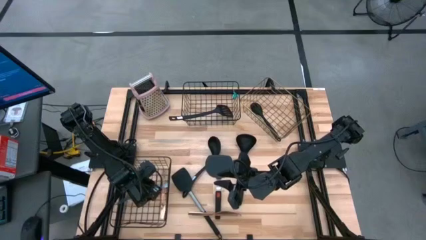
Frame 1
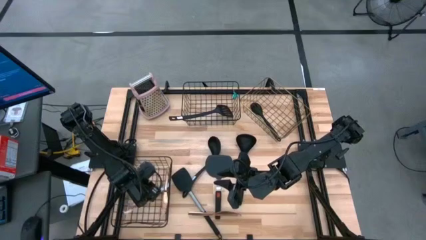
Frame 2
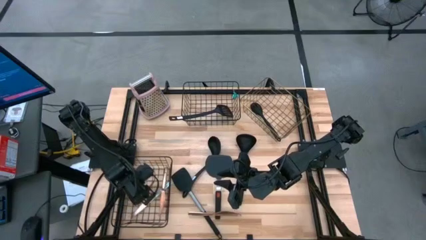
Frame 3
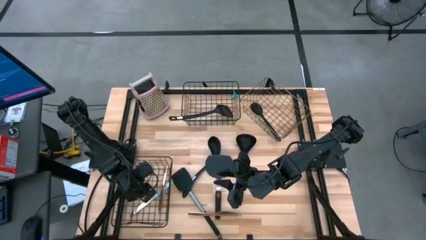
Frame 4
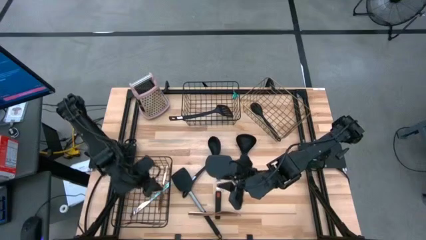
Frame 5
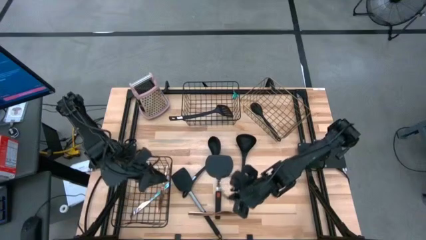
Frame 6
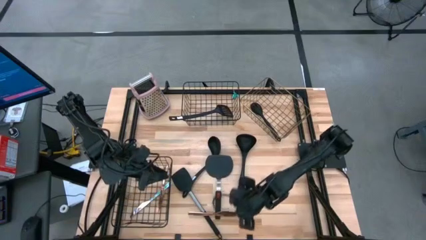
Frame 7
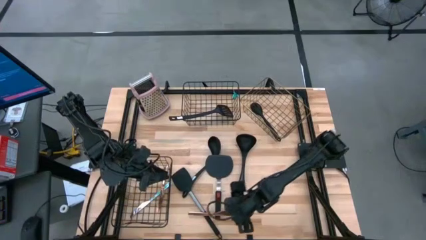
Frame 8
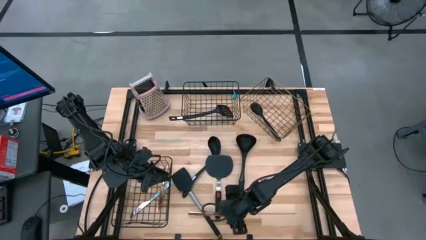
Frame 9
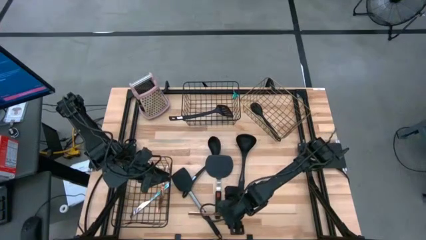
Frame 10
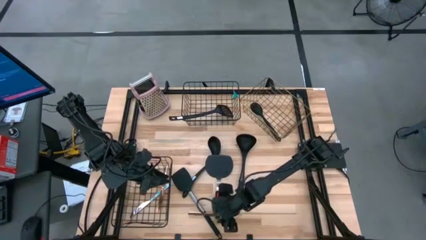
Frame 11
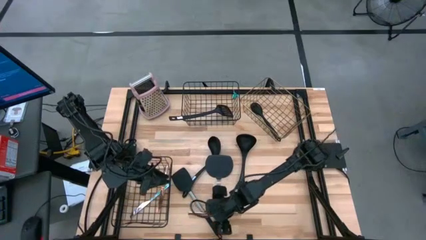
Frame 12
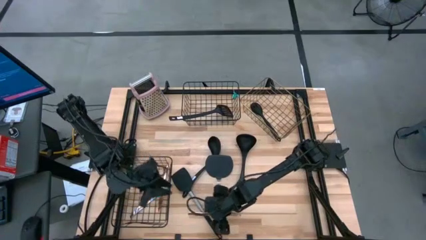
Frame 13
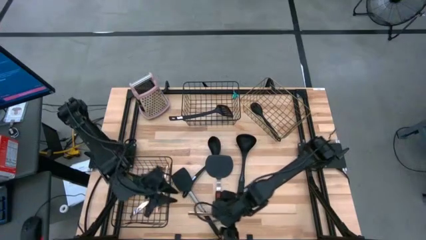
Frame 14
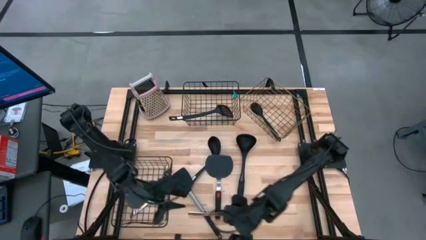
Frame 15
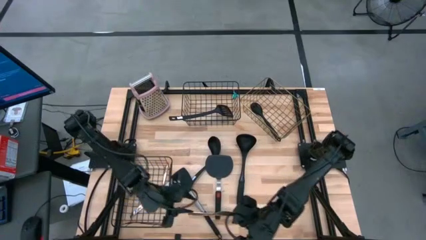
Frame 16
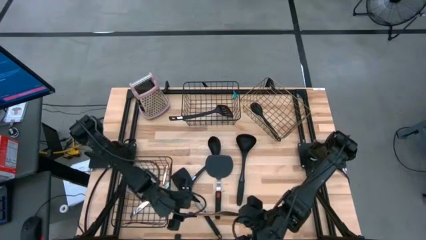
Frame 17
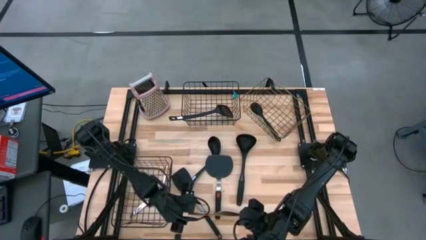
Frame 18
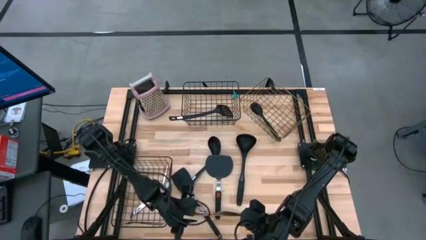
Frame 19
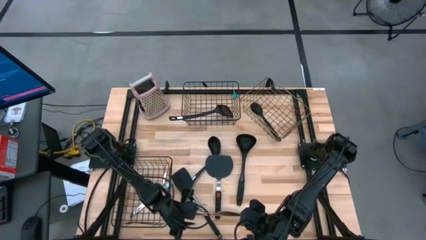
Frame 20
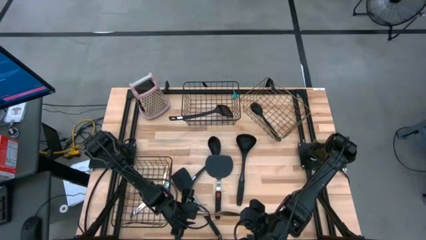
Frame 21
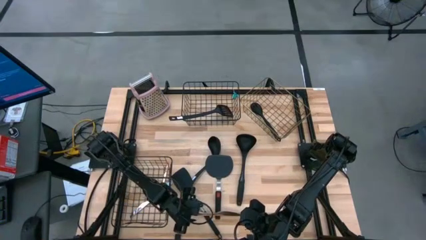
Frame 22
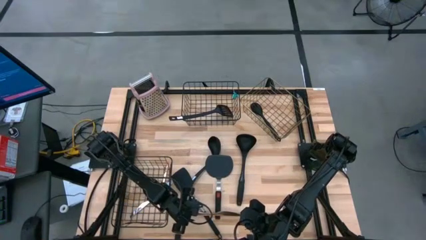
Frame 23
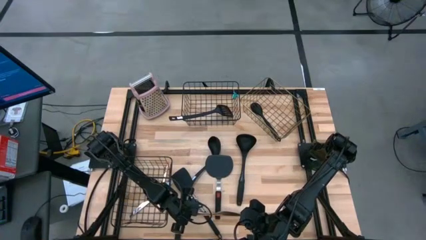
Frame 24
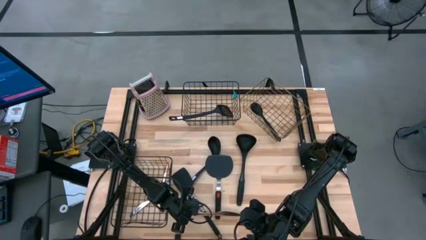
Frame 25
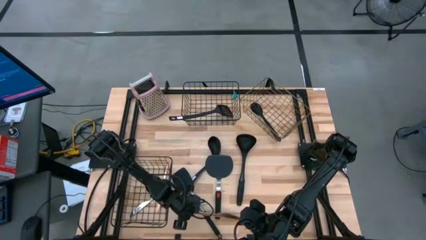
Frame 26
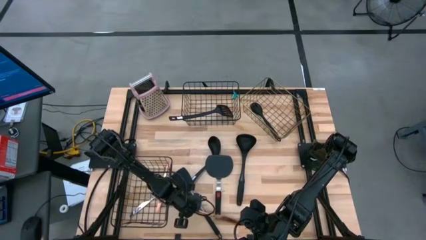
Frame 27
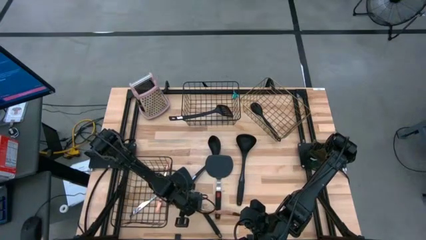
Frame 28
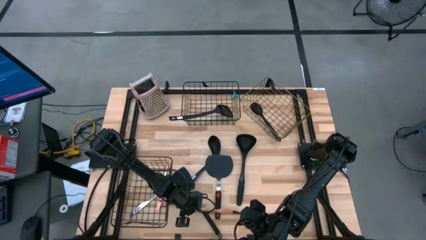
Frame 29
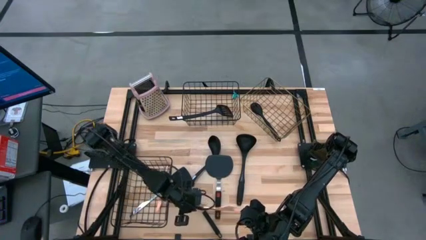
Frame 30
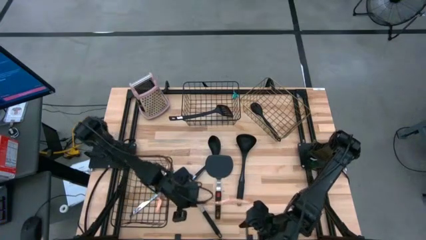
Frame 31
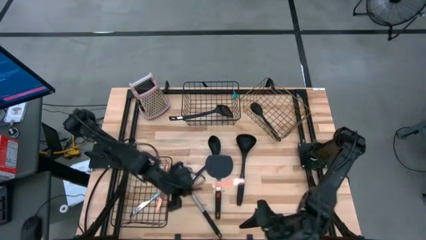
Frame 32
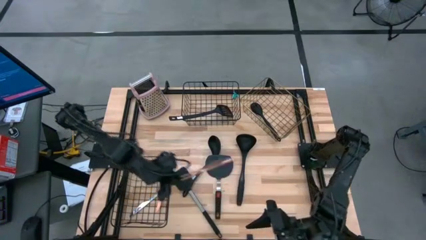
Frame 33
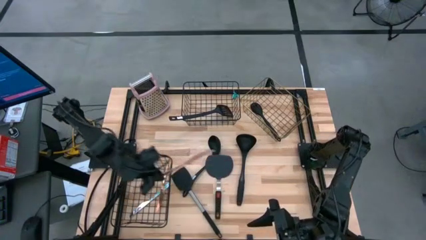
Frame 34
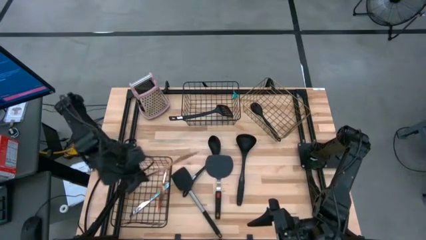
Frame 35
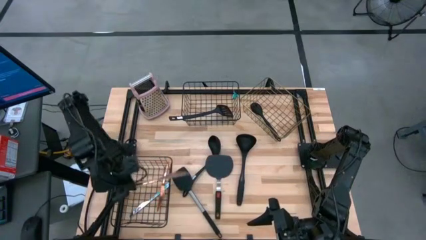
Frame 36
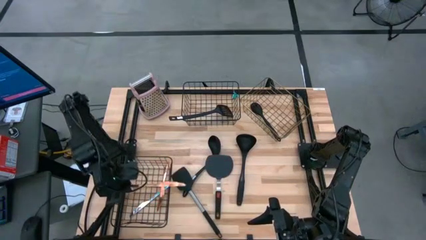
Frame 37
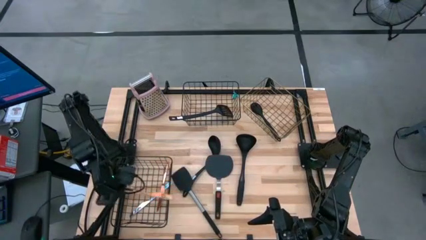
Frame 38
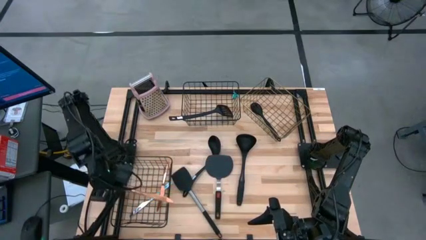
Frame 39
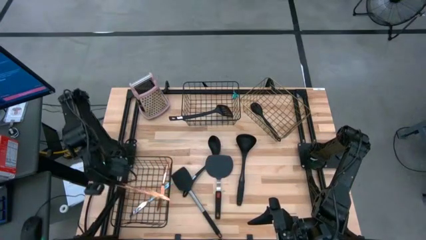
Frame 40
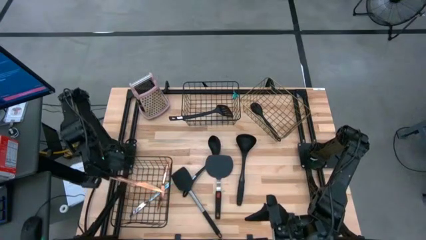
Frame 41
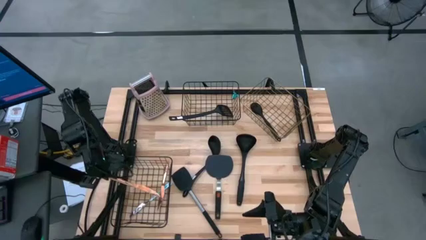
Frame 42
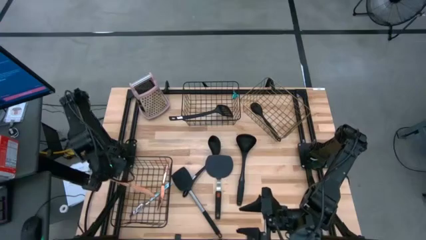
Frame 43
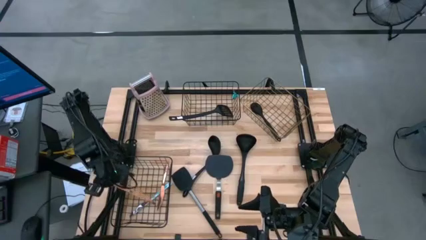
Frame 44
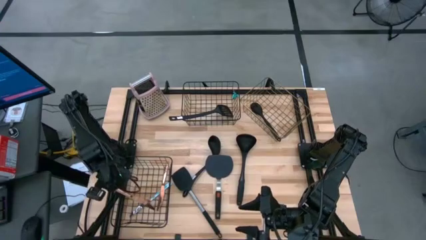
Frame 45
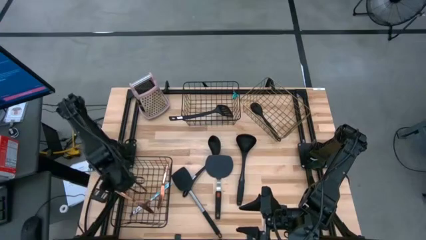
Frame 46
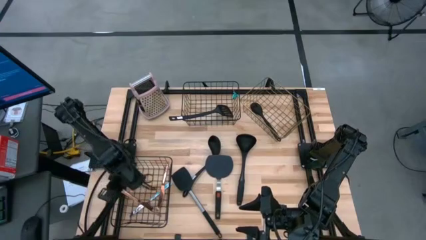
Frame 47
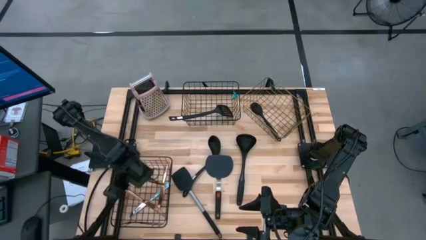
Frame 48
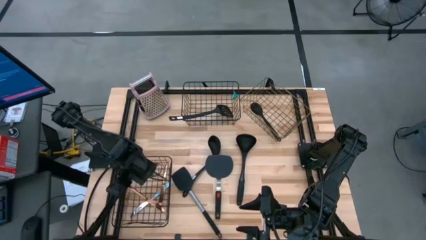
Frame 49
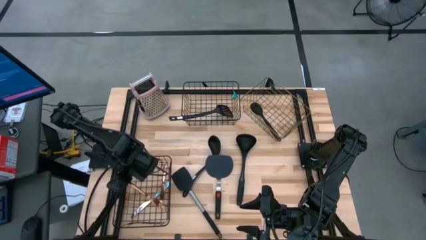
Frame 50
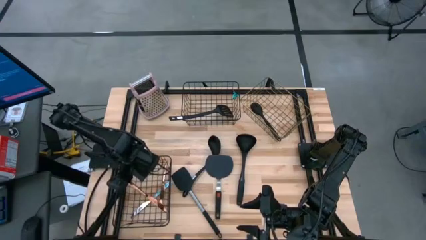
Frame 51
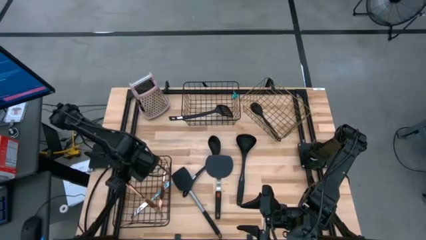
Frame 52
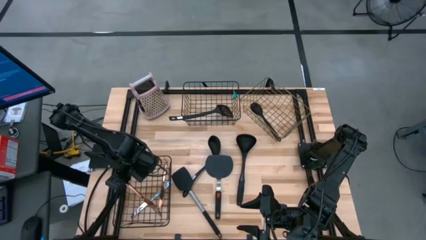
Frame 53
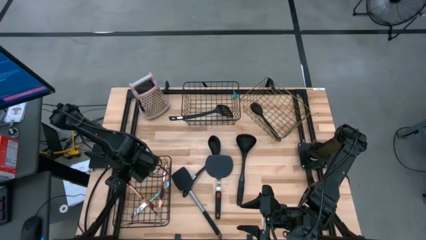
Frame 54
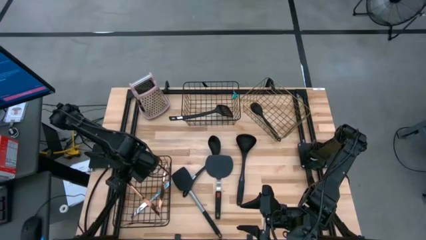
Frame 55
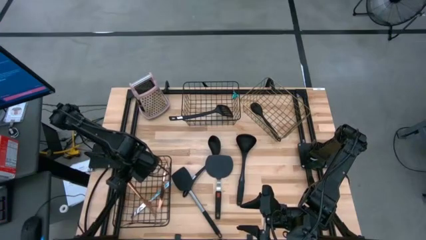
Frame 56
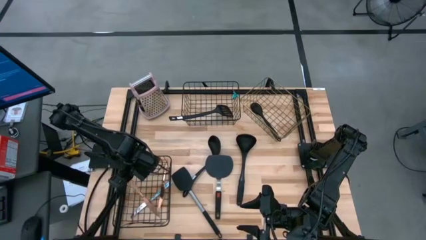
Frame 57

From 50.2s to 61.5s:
Task: Pick & Place Kitchen Items
Put the brown table knife into the bottom wire basket

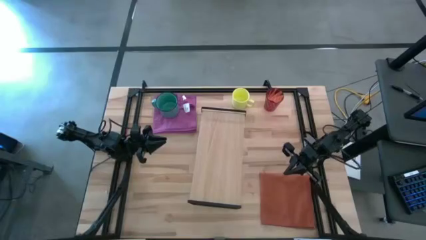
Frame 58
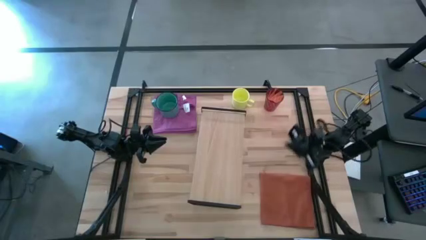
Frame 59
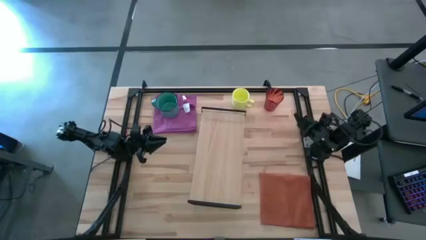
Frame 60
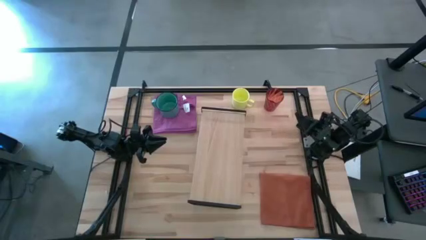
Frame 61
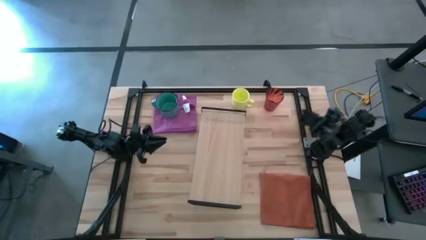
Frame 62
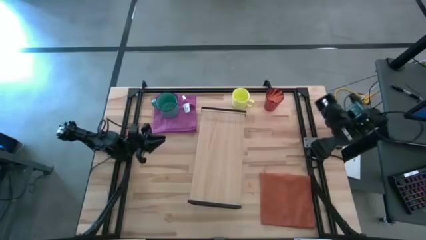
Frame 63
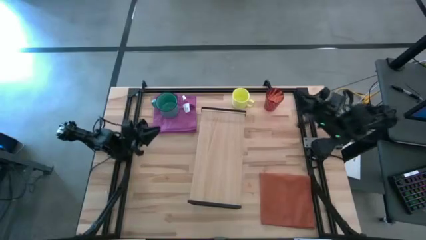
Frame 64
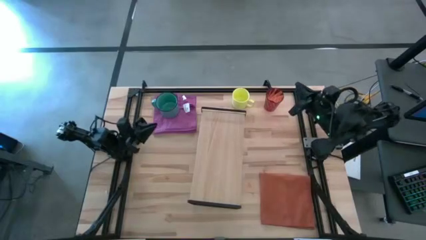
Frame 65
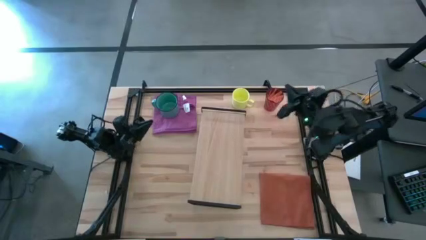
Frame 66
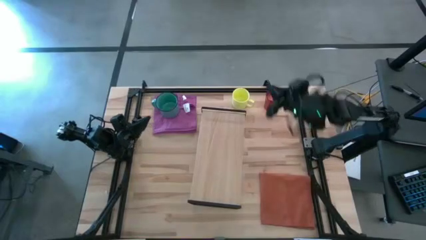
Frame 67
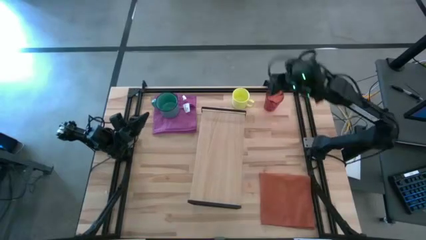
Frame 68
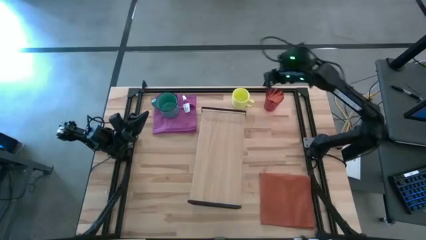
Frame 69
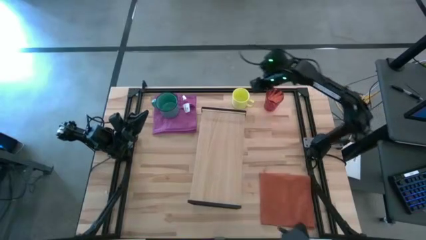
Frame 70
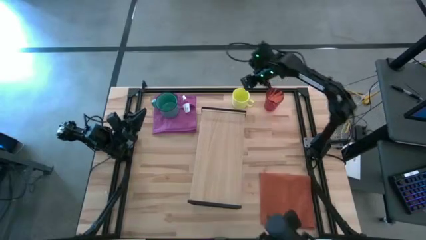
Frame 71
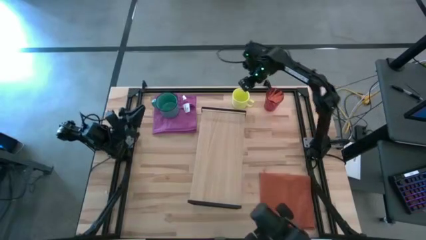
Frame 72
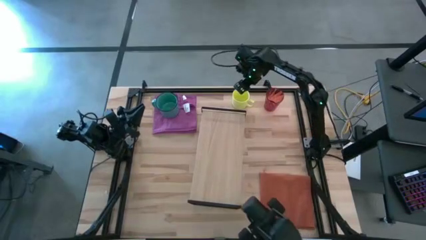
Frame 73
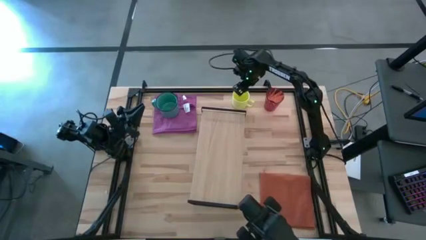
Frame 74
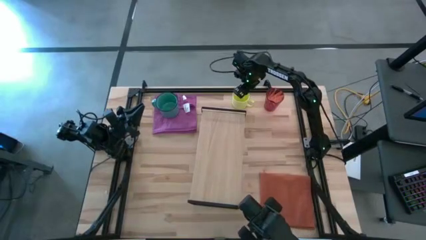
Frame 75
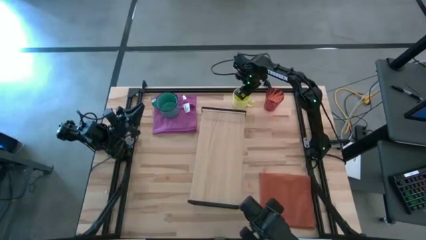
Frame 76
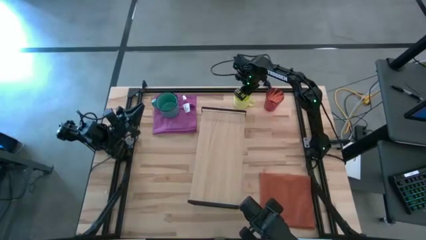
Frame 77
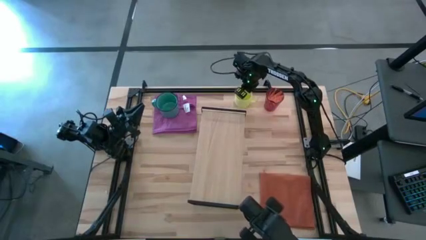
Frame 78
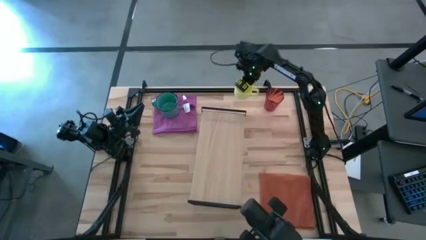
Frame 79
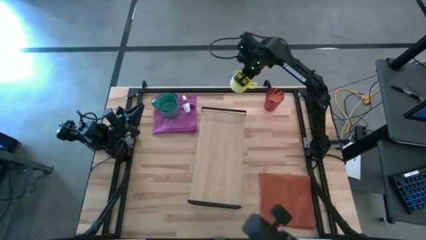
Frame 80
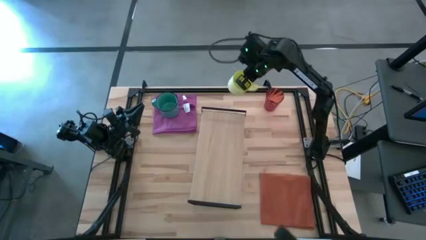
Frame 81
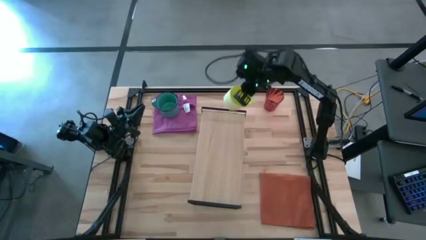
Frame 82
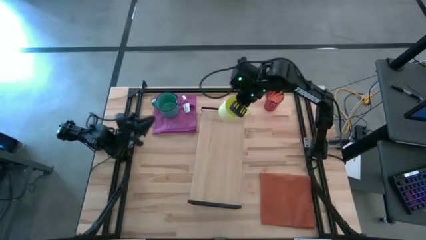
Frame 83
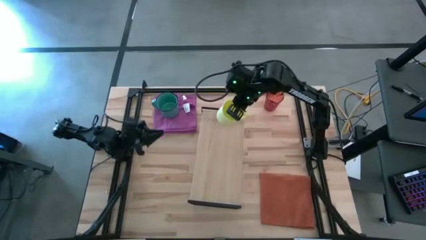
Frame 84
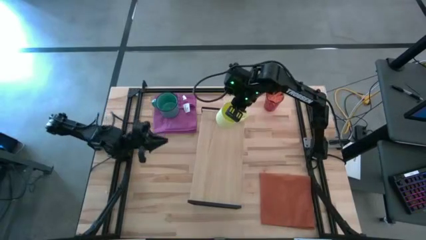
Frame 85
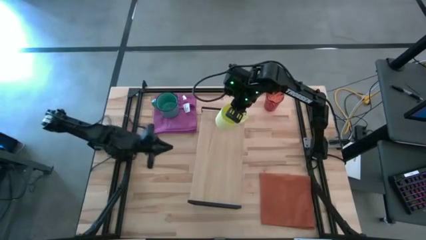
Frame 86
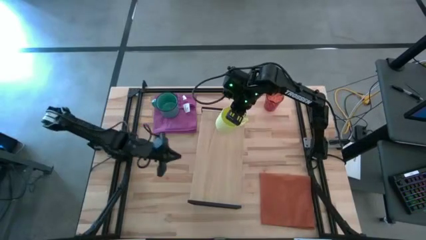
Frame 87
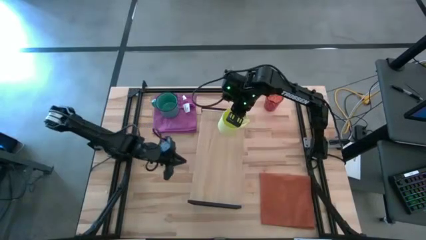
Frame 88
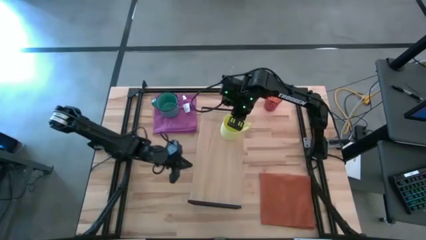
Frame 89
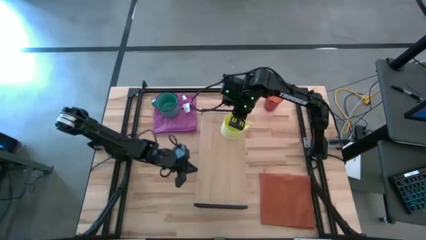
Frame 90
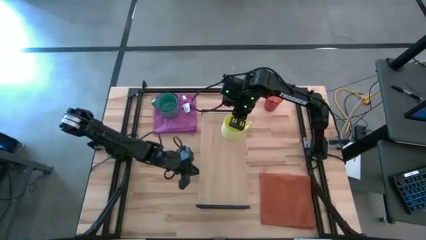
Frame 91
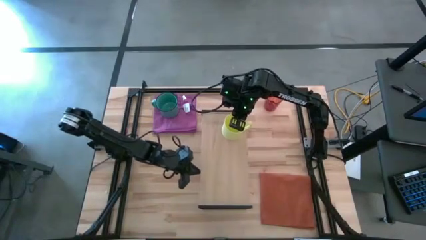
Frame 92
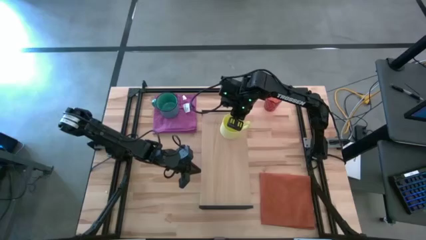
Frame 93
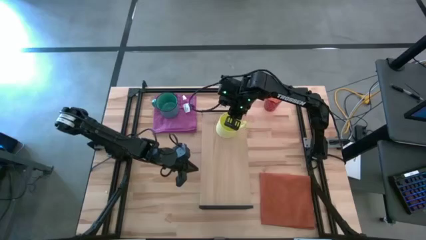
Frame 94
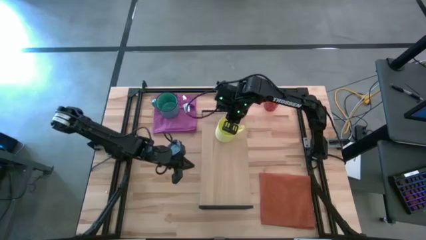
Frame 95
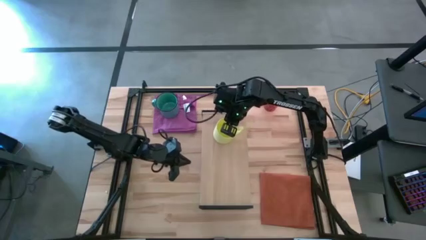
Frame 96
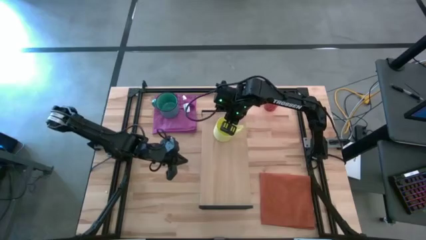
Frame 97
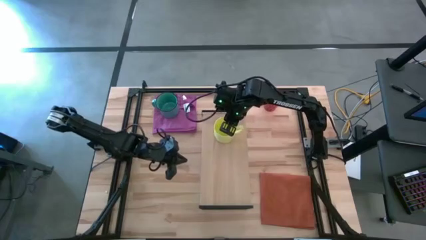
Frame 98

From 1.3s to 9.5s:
Task: Stack small to large cups/mugs on shelf
Put the yellow mug on the shelf
